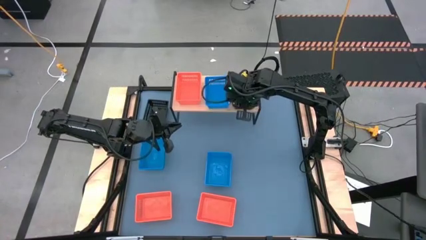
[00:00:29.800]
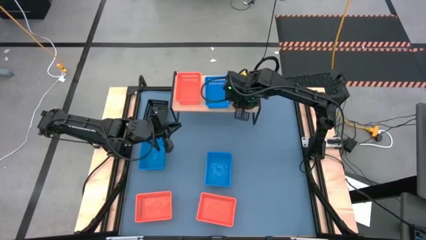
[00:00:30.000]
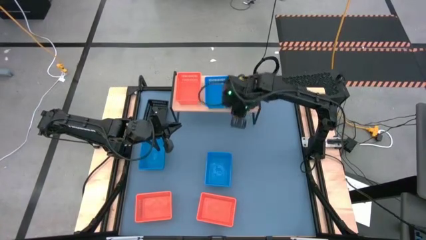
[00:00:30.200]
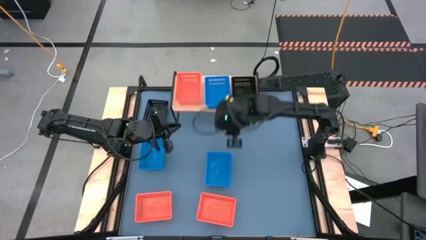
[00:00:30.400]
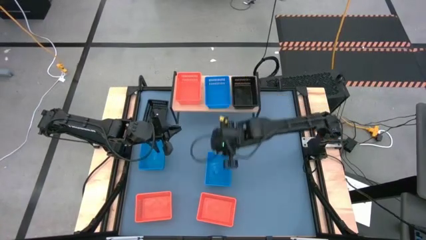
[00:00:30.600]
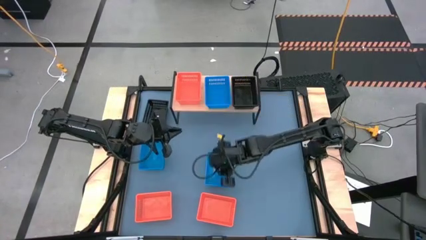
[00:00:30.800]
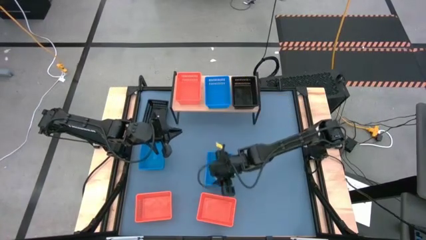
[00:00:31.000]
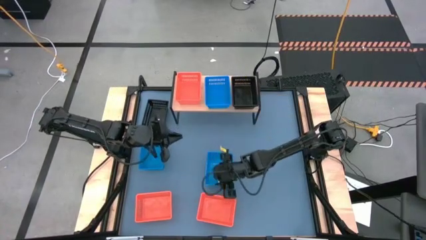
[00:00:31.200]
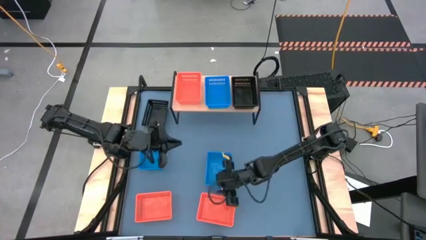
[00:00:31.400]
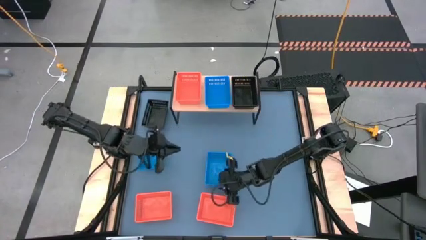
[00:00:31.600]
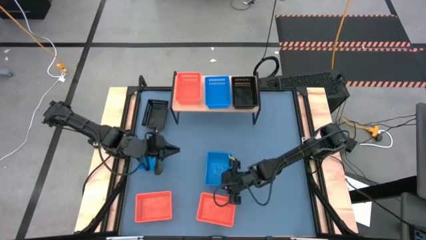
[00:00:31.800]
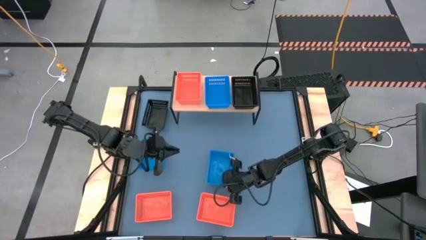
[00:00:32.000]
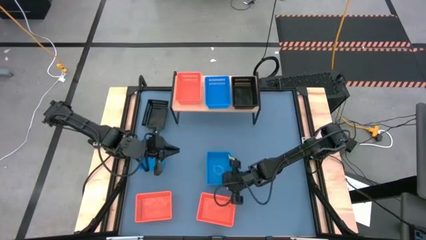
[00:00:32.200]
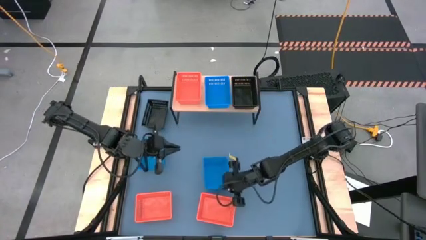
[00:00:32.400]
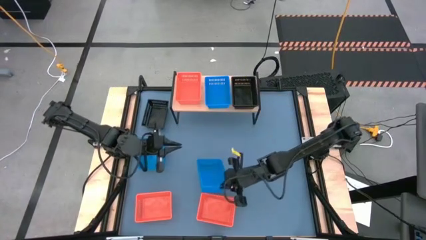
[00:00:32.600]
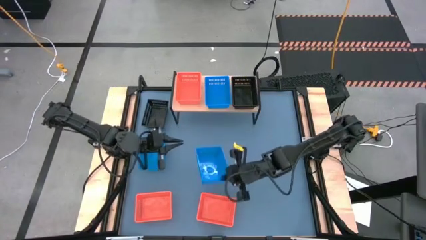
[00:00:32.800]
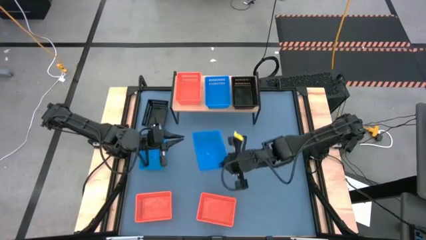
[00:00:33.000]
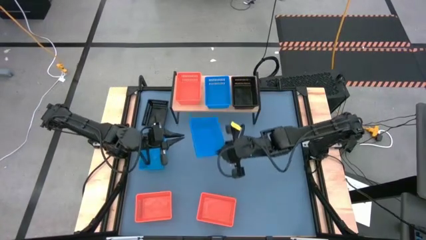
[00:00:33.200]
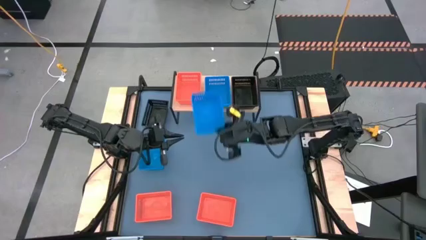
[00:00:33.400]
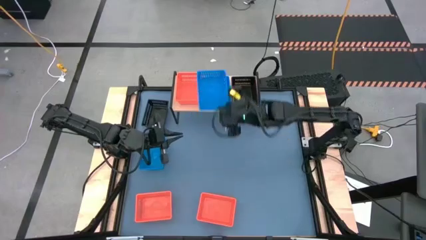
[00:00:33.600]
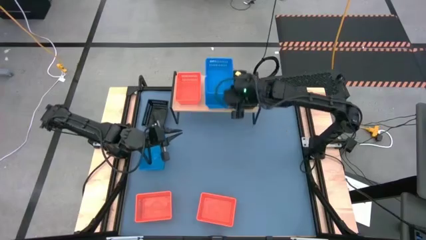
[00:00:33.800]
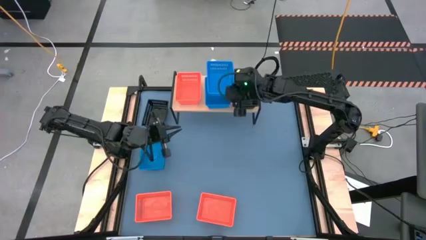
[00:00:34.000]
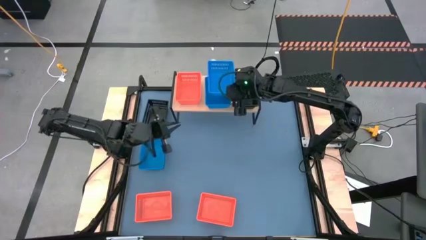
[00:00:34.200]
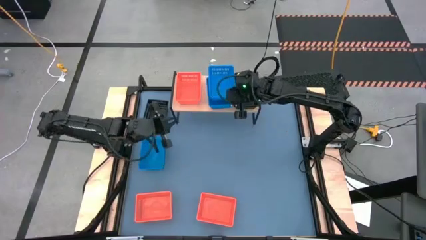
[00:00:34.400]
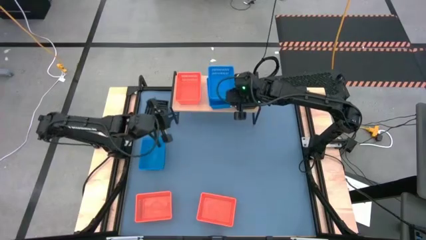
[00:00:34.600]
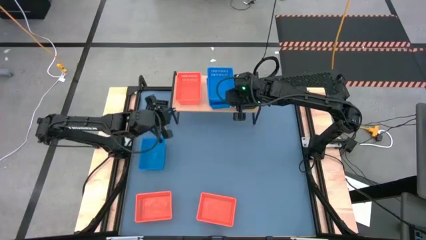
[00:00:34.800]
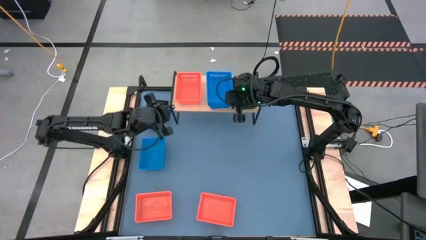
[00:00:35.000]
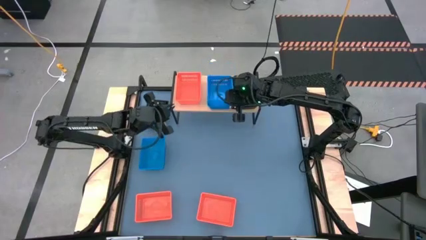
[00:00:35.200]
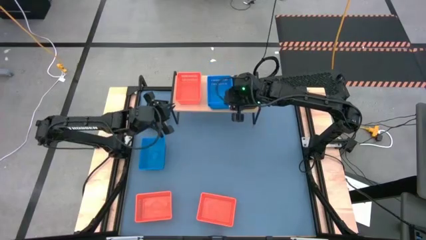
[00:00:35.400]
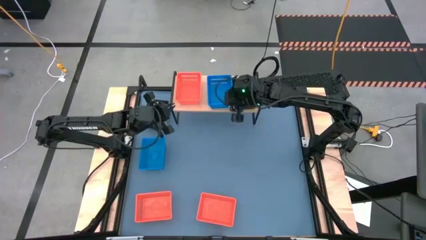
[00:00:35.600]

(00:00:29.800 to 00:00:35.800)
Task: Stack baskets on shelf by color
Stack the bottom blue basket on top of the blue basket on the shelf

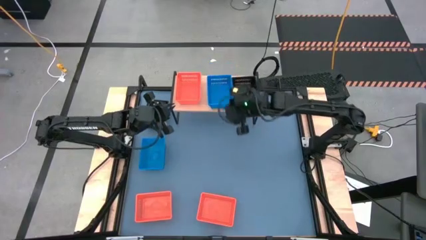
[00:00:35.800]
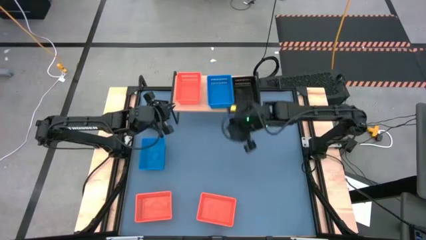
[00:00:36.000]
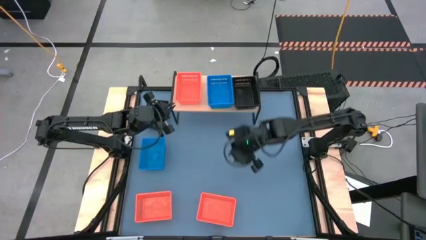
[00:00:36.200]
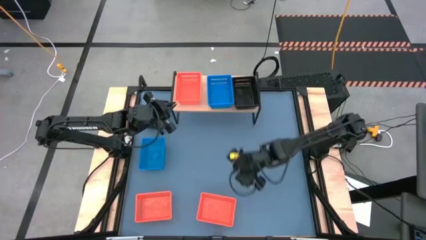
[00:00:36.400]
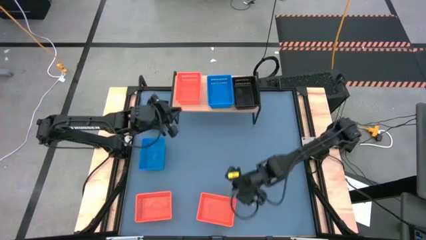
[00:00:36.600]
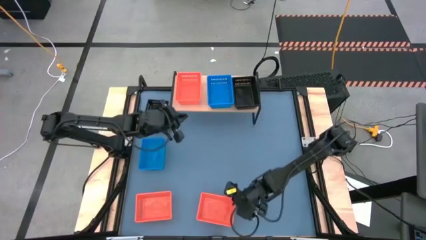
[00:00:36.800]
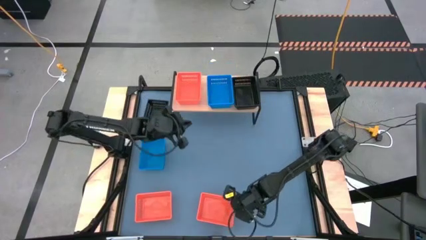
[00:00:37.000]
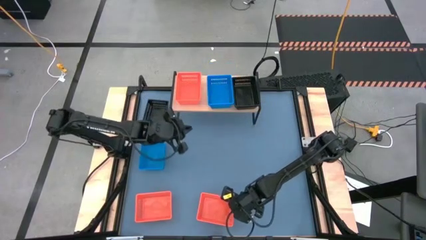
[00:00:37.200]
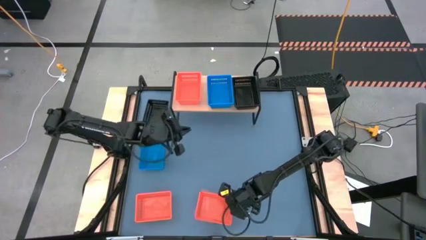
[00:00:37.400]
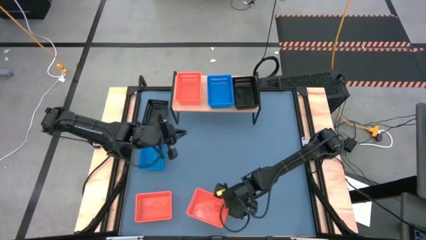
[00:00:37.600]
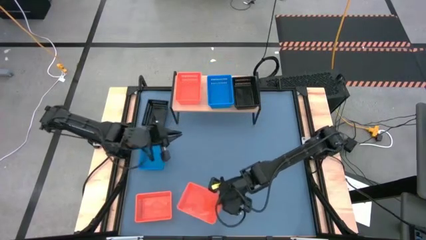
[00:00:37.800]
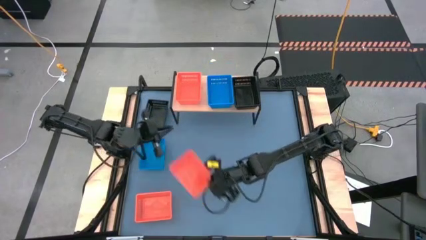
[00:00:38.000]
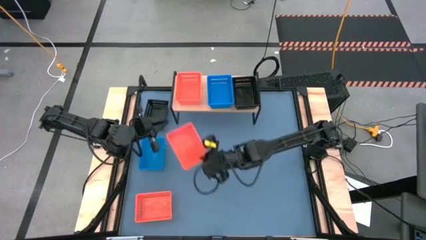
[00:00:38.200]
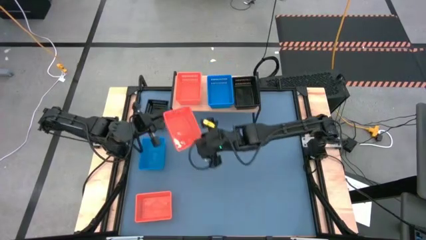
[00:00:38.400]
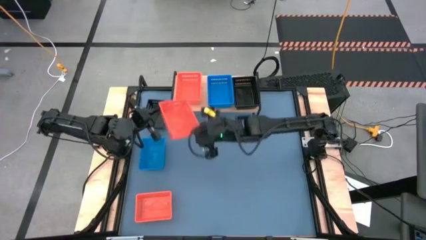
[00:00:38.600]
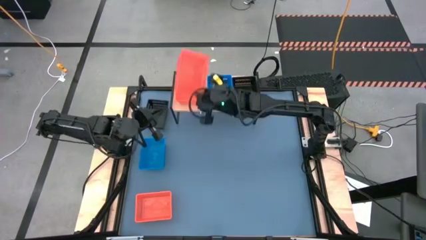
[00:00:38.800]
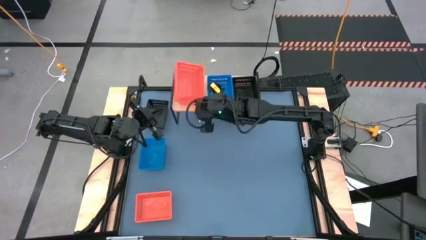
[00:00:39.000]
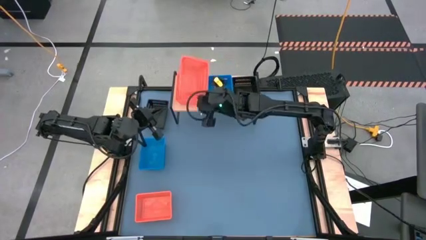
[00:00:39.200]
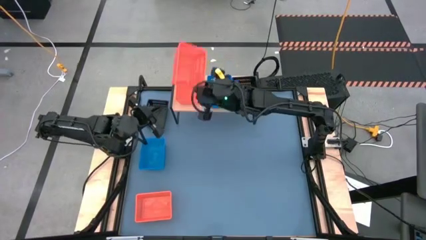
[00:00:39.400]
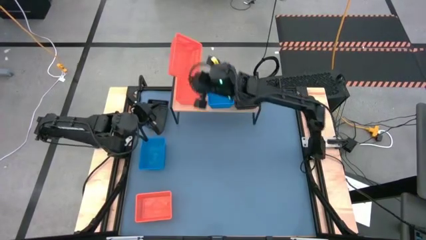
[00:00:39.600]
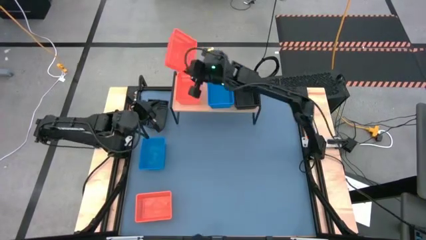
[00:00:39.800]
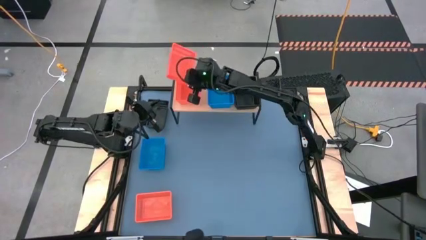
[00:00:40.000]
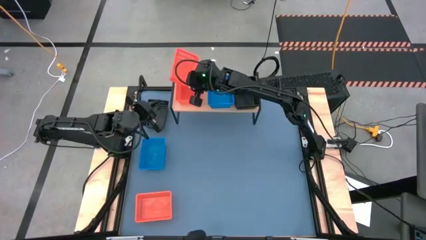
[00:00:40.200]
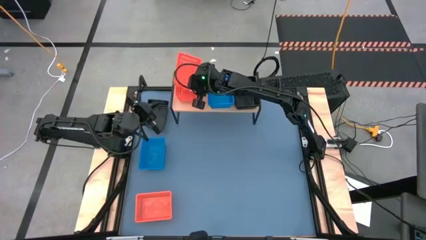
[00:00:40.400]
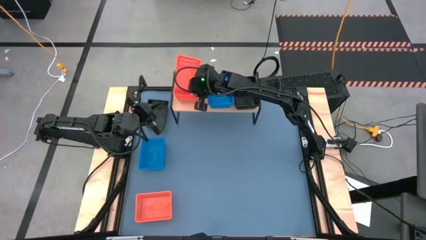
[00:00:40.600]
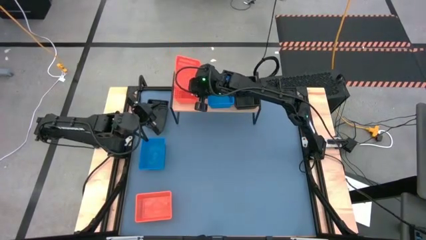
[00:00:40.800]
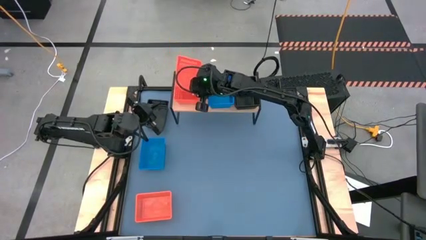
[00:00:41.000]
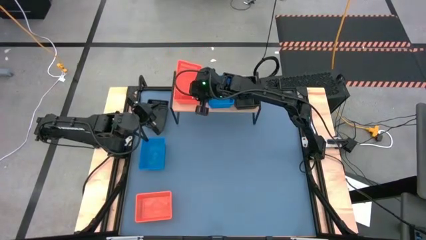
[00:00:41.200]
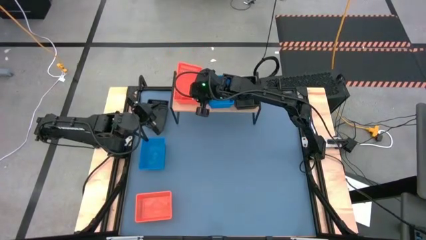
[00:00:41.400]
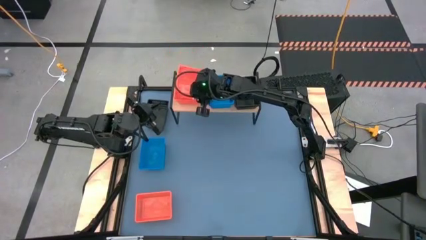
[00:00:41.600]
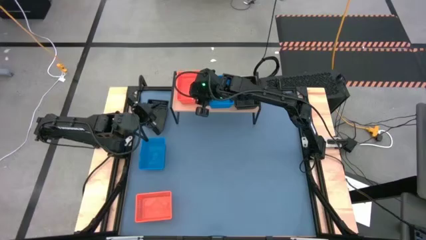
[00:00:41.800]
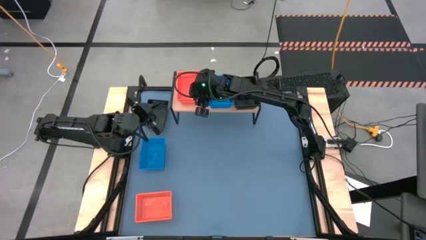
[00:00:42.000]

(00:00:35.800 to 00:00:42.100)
Stack the right orange basket on top of the orange basket on the shelf
